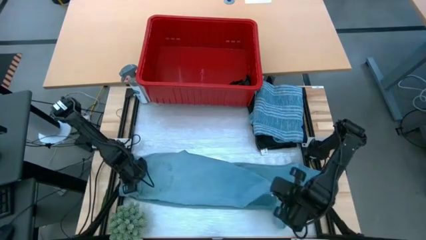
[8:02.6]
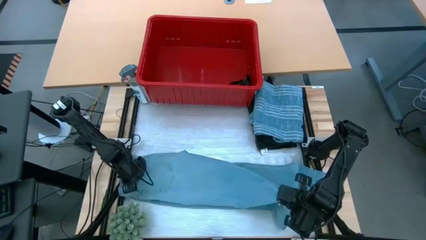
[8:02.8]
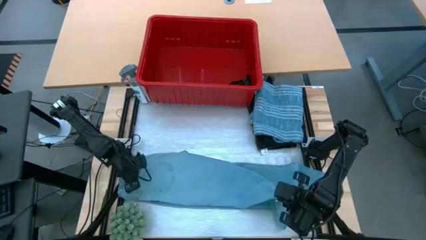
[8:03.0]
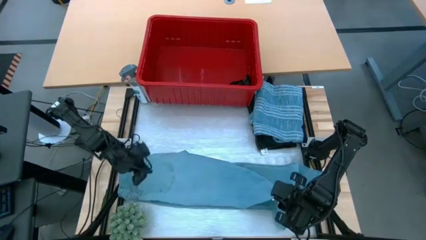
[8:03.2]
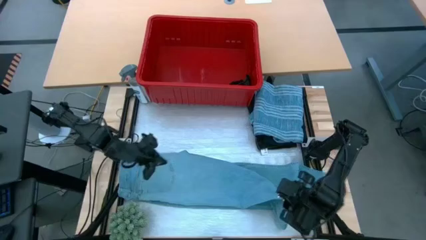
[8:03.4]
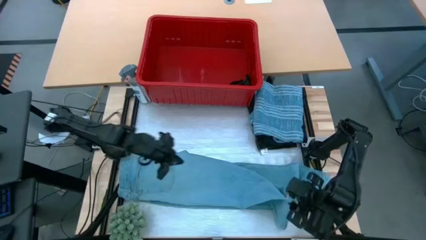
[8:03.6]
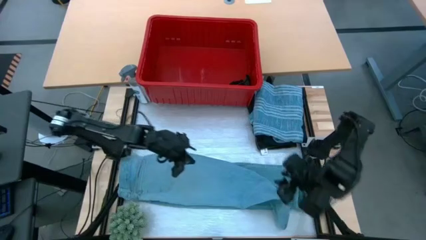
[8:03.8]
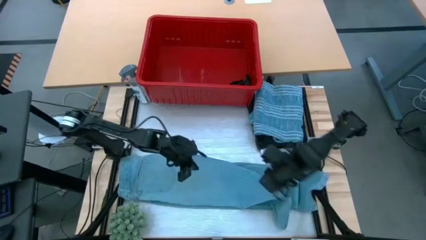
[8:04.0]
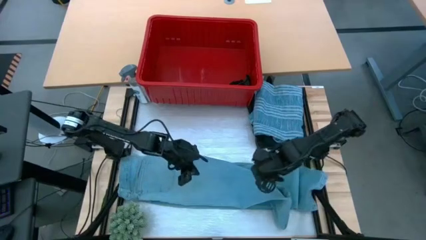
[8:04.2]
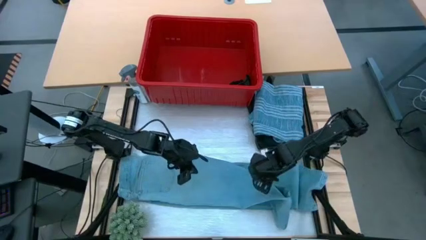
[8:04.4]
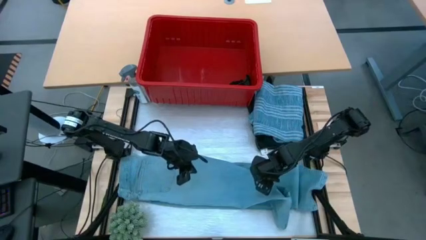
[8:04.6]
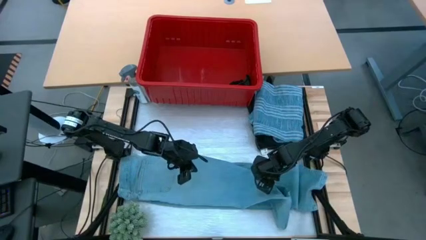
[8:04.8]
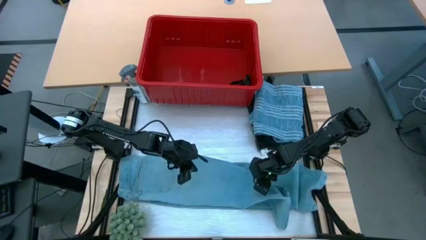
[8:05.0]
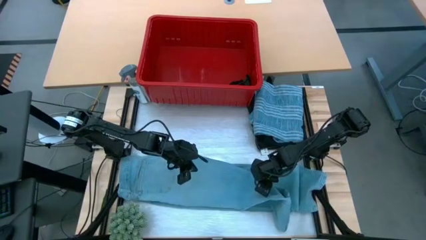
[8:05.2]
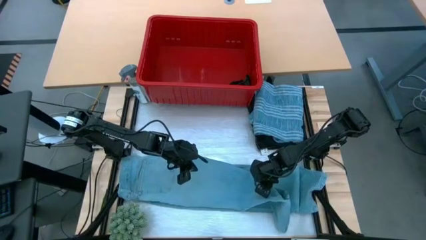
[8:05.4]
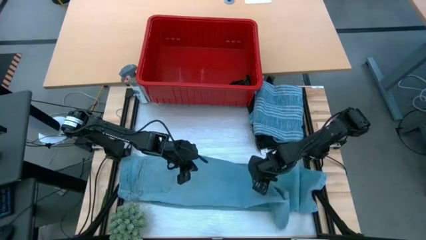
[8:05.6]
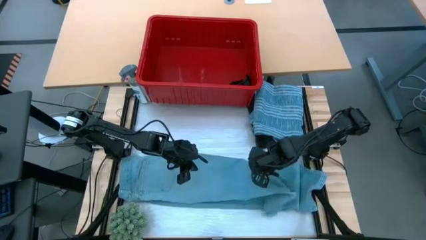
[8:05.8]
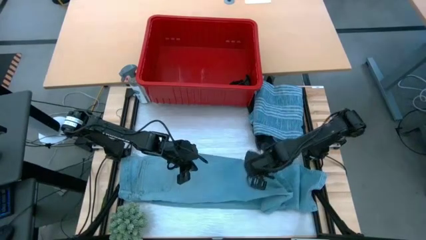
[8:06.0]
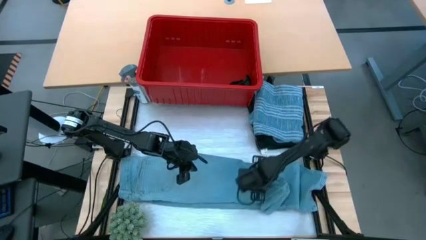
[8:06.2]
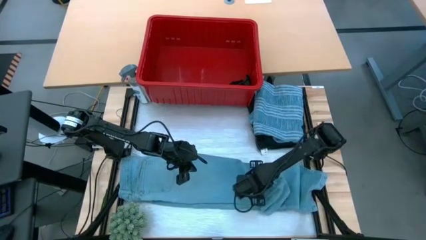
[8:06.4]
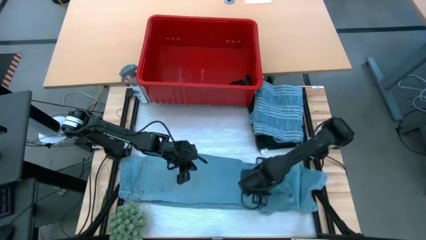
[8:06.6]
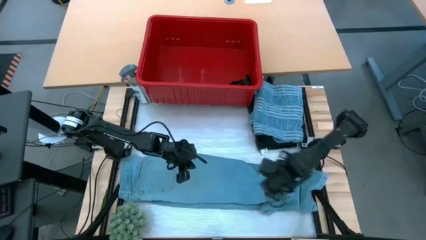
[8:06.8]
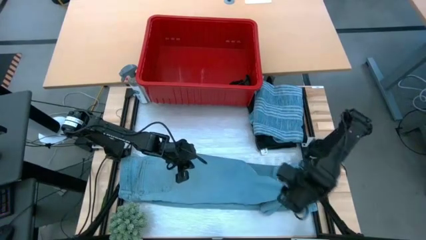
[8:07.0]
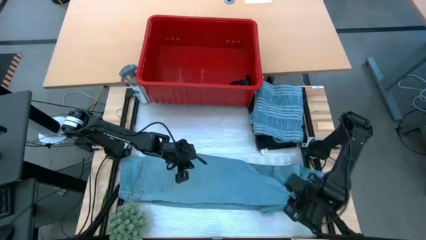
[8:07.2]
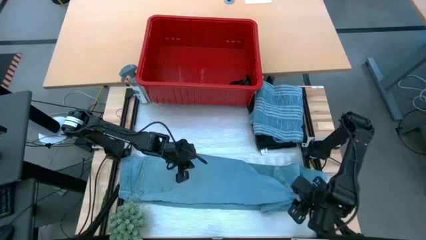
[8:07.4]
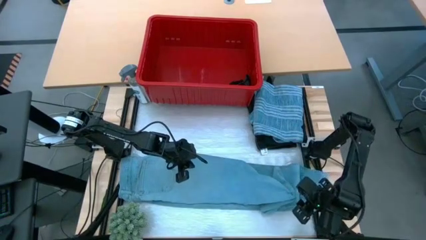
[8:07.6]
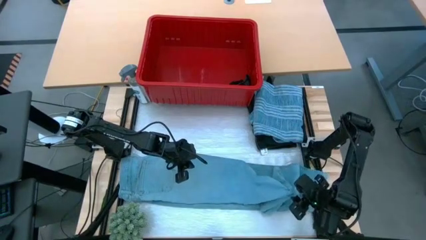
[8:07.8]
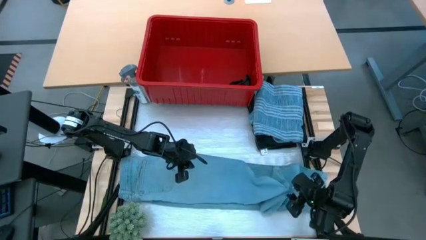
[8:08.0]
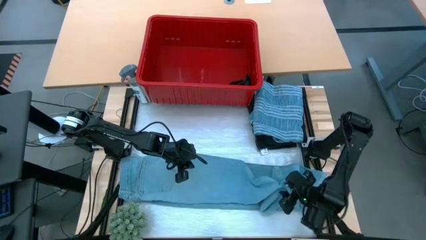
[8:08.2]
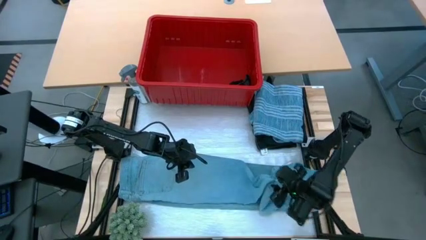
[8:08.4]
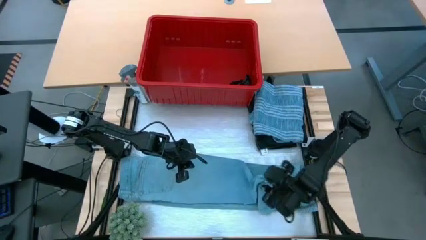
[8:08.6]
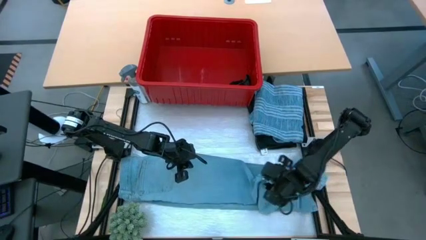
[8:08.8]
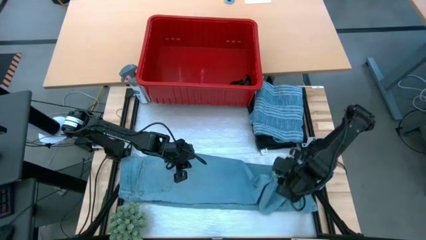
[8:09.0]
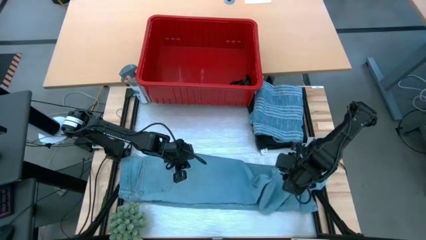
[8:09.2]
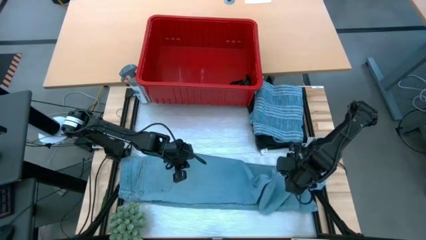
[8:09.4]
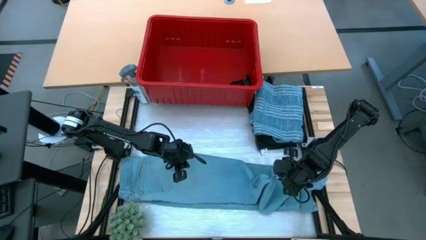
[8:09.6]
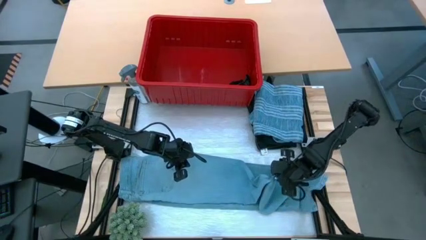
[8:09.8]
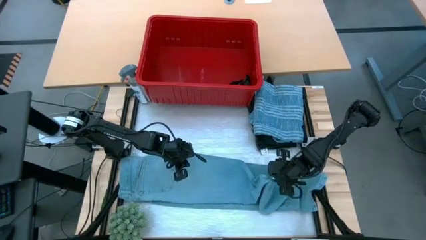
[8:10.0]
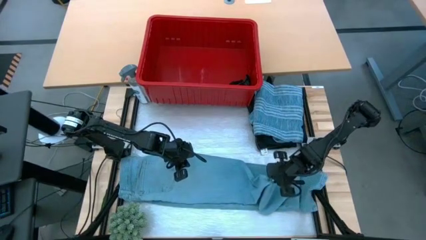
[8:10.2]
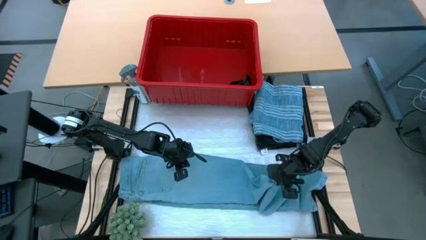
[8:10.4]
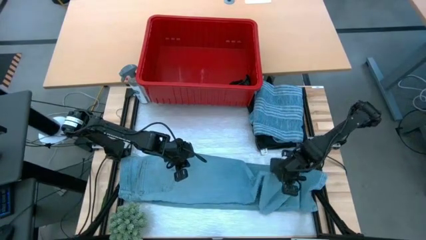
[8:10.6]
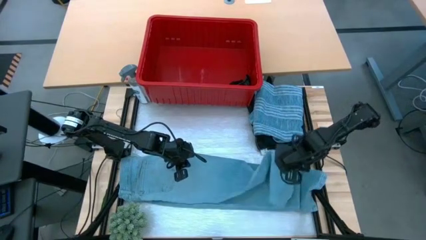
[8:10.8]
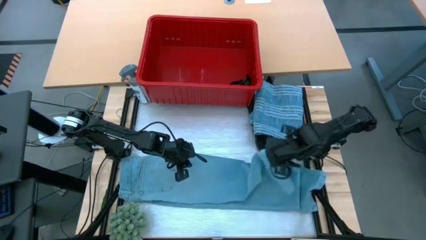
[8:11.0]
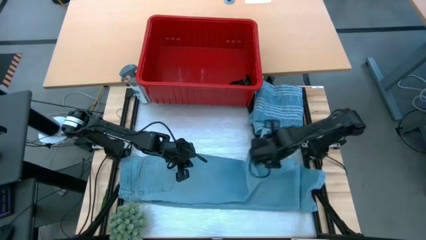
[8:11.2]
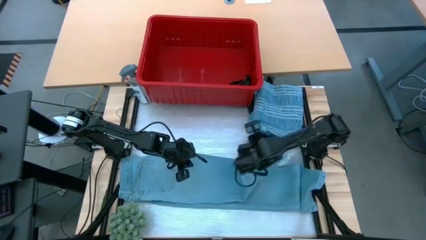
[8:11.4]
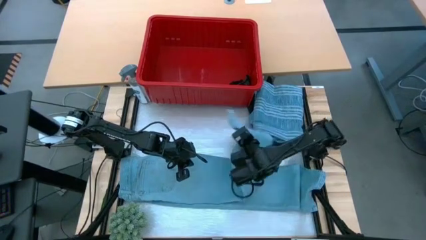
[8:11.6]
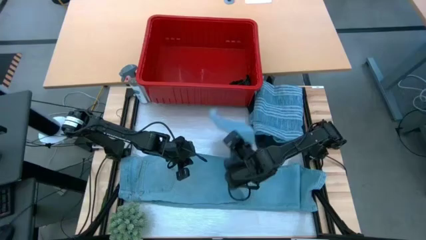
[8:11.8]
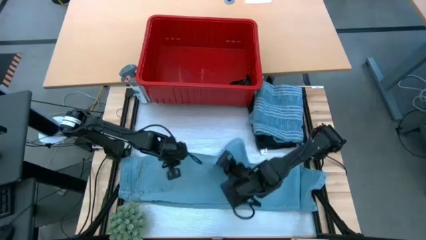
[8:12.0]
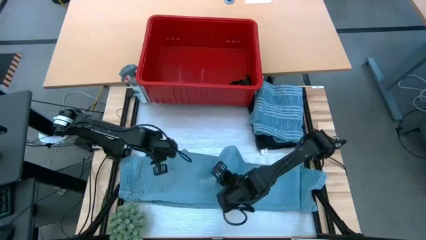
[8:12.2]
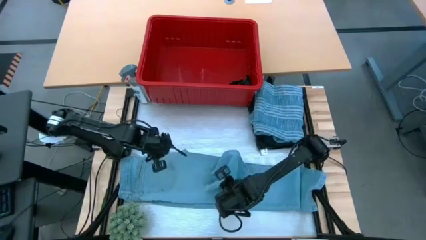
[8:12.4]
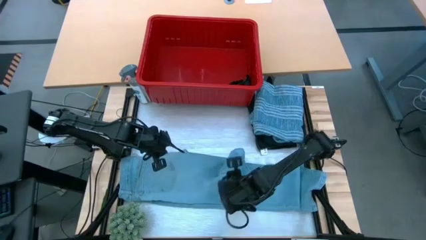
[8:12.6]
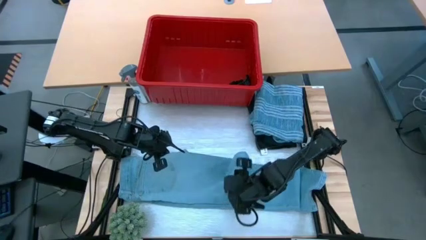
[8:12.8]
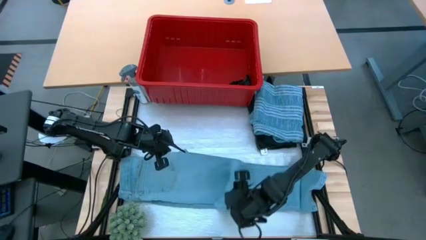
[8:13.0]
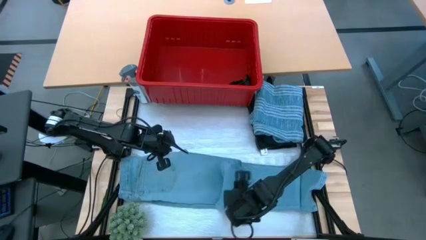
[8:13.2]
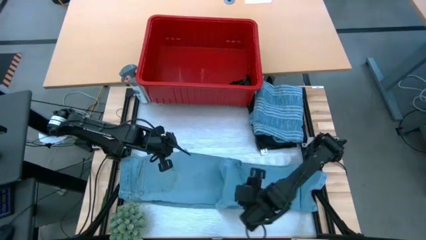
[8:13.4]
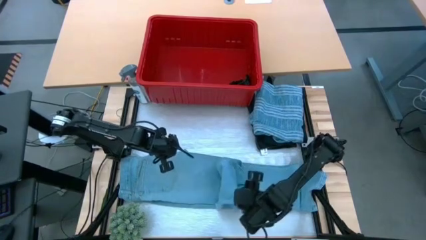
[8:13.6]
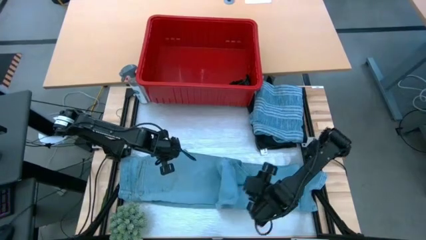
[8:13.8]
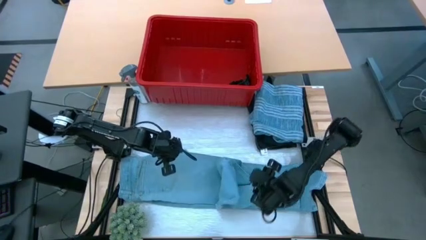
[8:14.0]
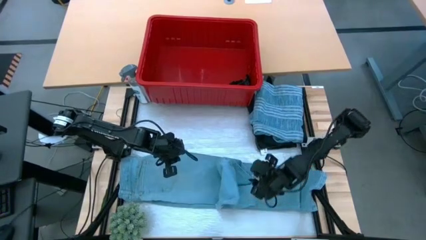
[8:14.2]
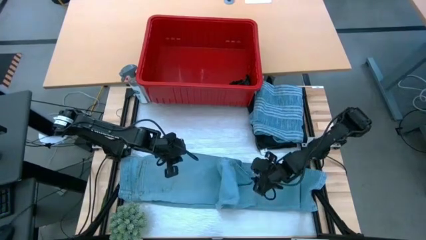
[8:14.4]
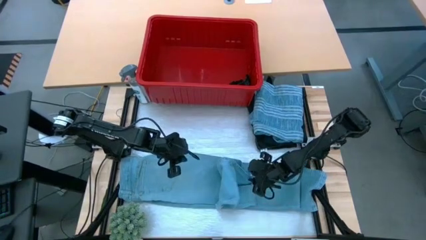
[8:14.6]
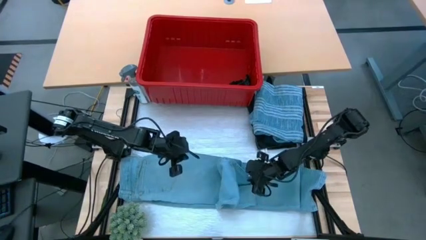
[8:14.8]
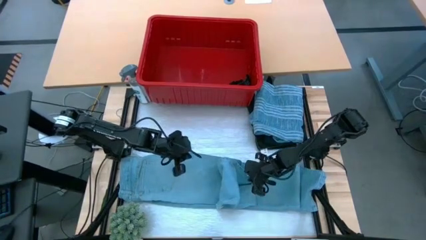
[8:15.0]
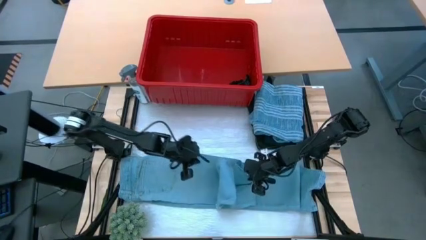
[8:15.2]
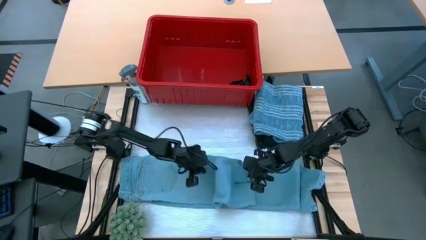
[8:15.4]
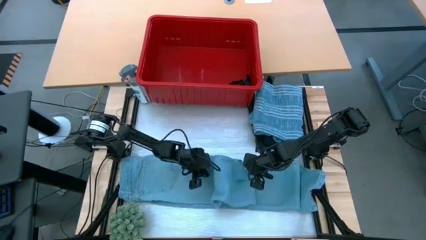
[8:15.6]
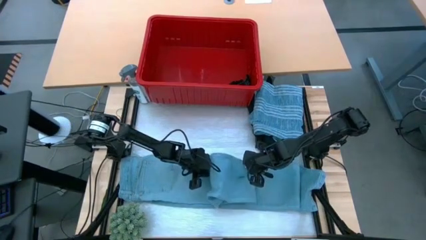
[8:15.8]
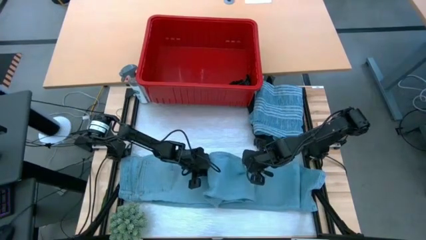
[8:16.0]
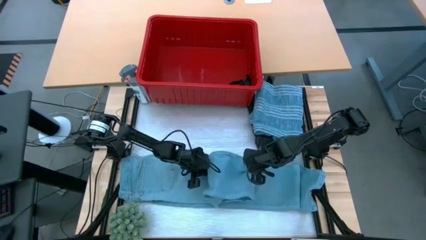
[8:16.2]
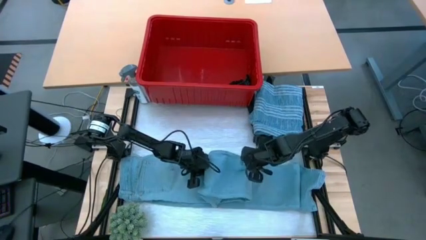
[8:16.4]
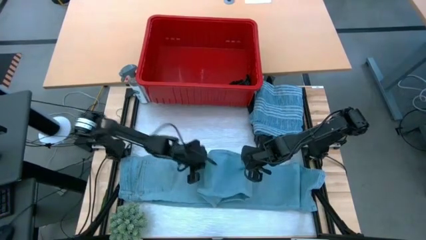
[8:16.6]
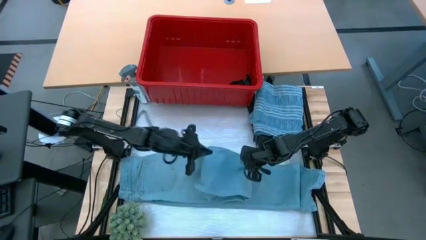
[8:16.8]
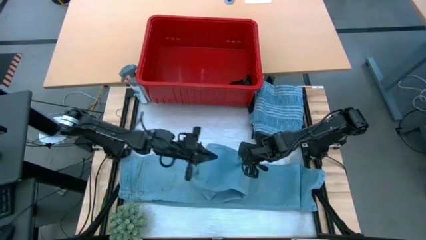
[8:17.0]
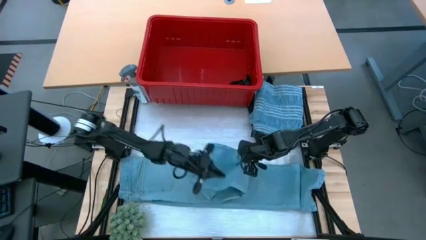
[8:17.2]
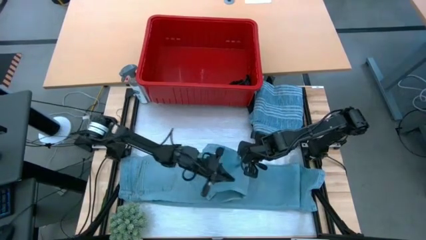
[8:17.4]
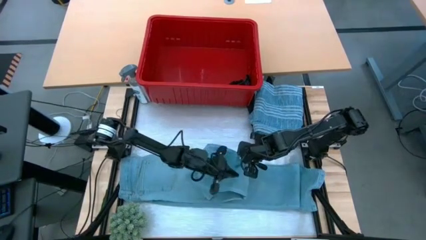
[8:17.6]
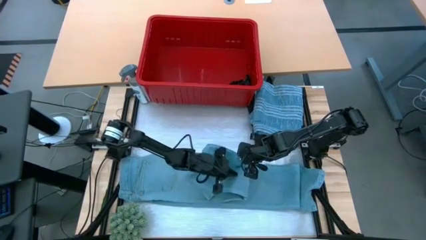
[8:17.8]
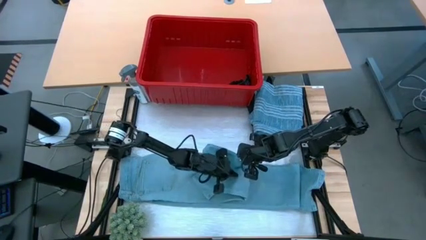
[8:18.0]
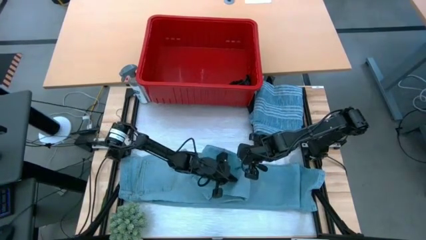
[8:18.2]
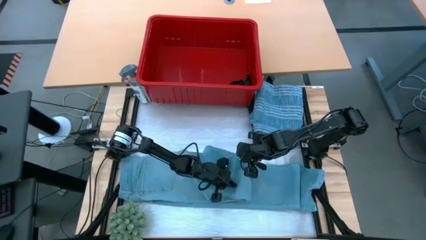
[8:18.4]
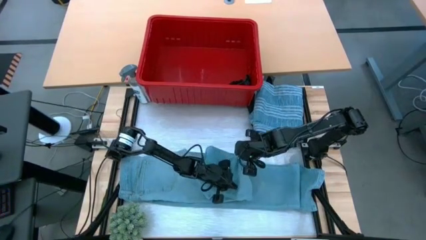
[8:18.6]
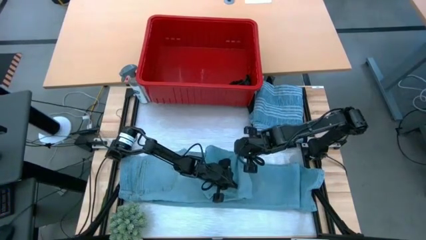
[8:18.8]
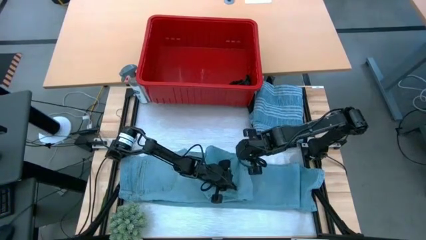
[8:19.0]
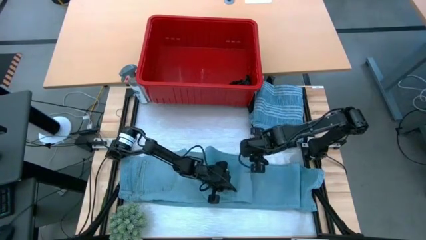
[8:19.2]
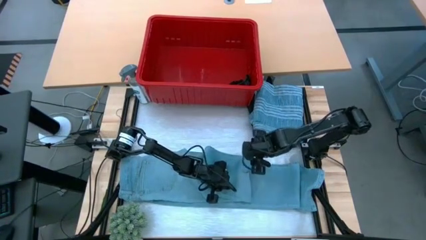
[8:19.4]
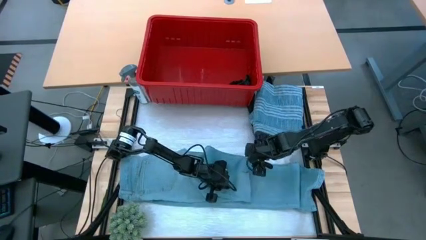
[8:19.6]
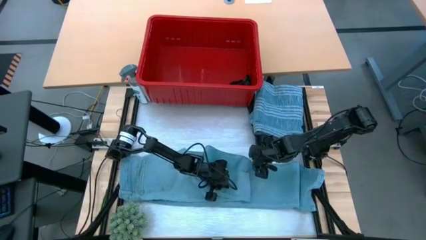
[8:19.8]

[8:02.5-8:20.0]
Task: Fold Laundry from Bin
Fold the light blue pants
